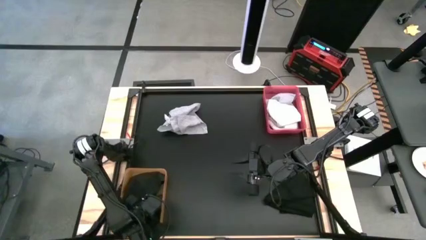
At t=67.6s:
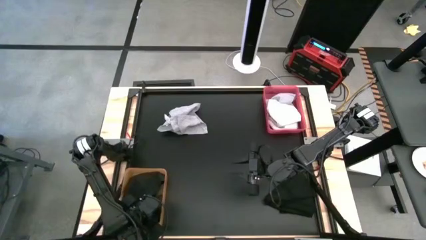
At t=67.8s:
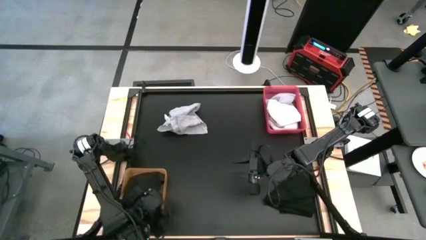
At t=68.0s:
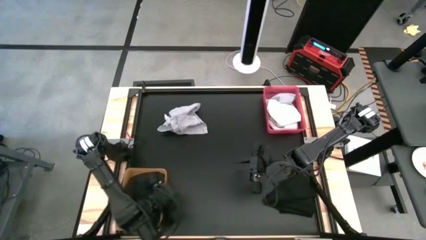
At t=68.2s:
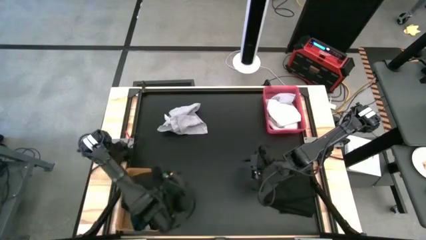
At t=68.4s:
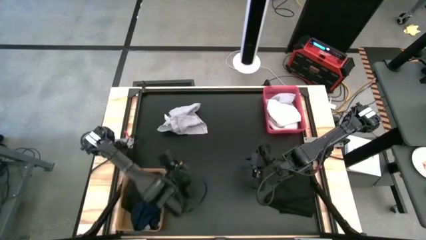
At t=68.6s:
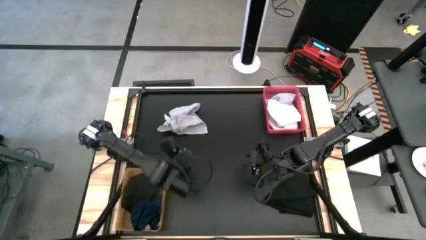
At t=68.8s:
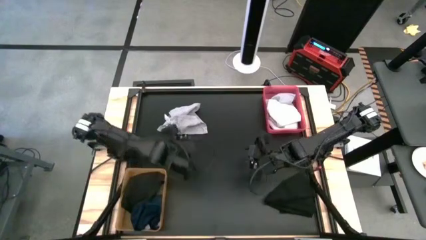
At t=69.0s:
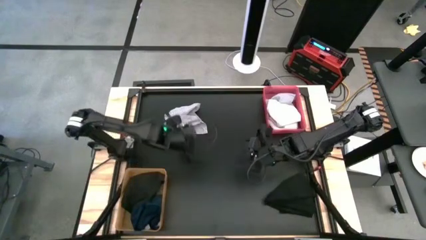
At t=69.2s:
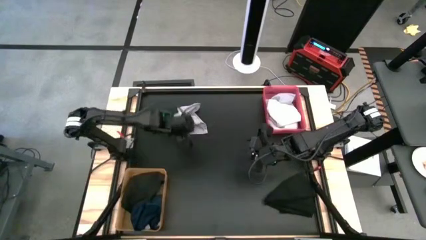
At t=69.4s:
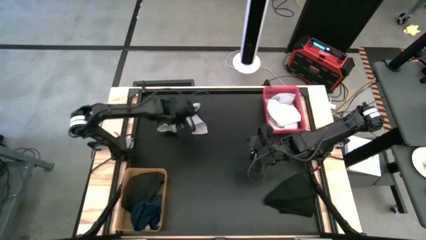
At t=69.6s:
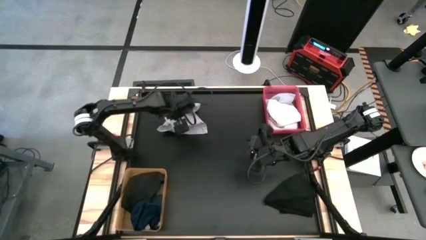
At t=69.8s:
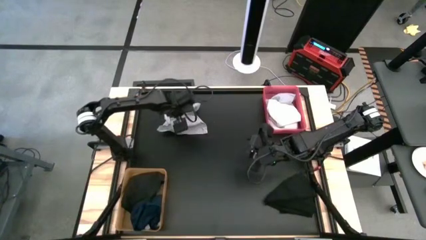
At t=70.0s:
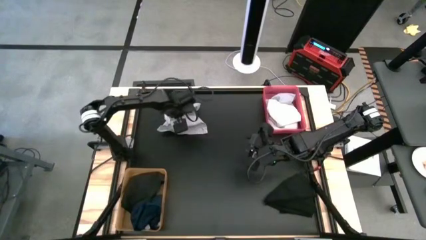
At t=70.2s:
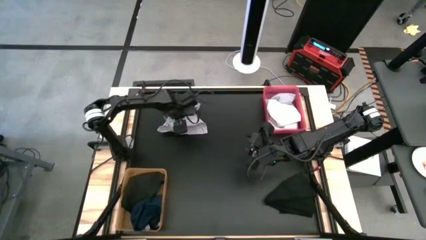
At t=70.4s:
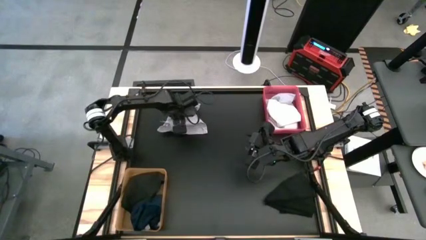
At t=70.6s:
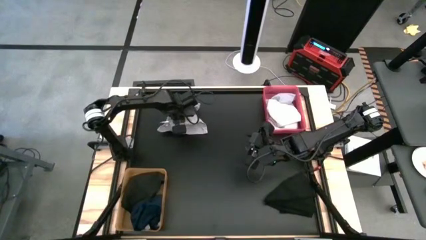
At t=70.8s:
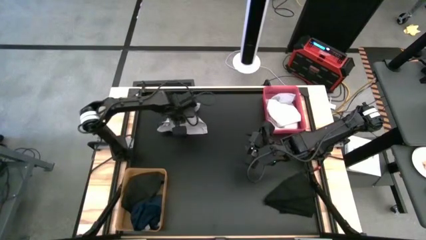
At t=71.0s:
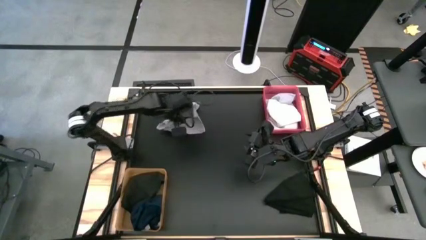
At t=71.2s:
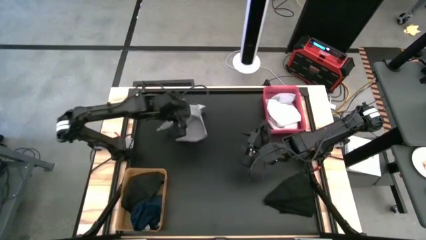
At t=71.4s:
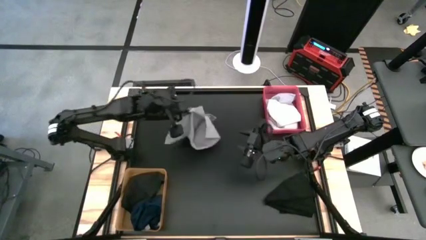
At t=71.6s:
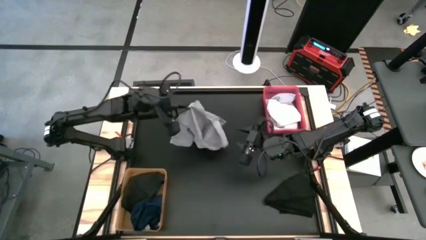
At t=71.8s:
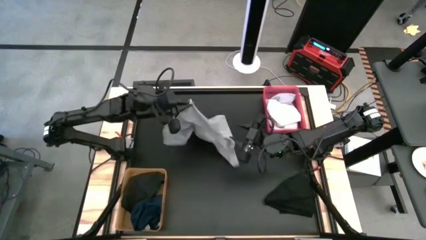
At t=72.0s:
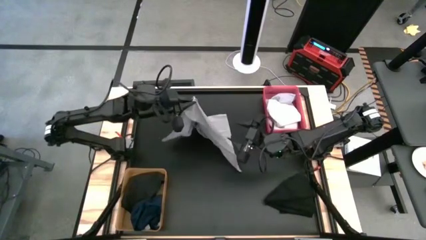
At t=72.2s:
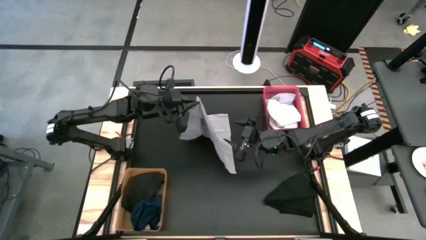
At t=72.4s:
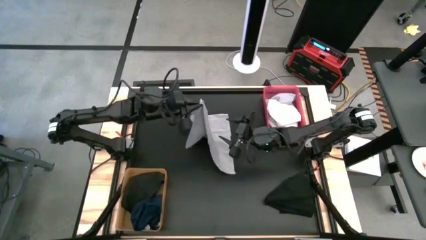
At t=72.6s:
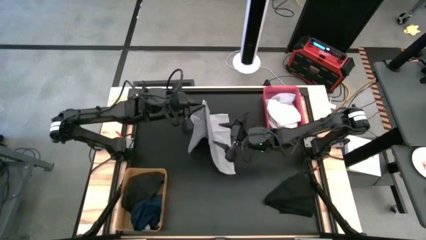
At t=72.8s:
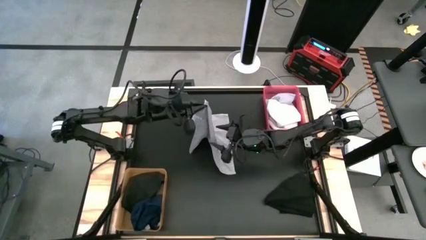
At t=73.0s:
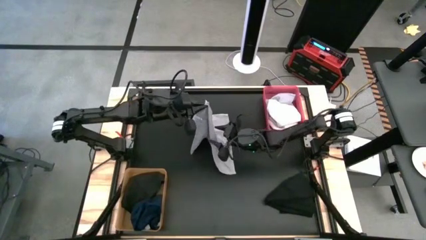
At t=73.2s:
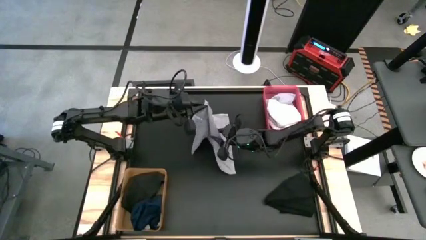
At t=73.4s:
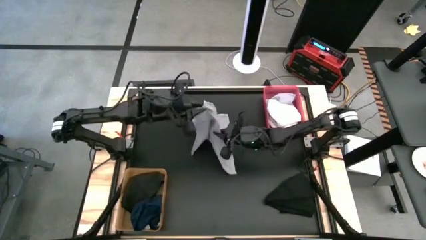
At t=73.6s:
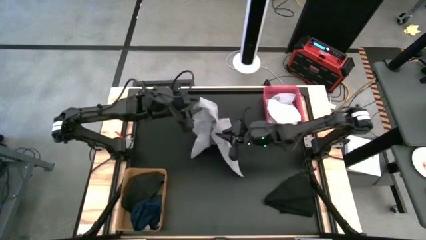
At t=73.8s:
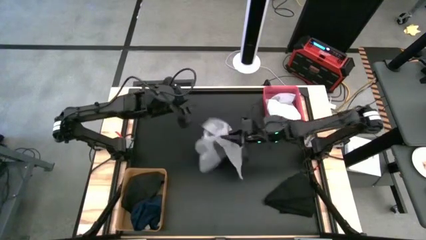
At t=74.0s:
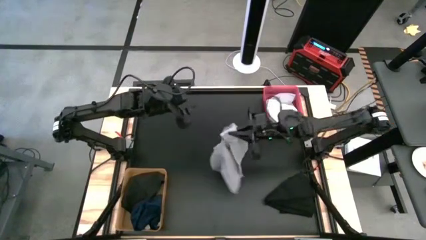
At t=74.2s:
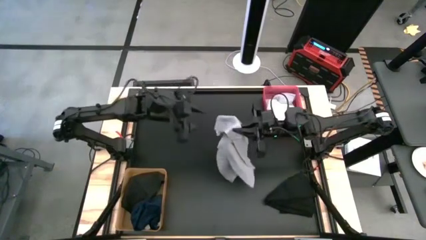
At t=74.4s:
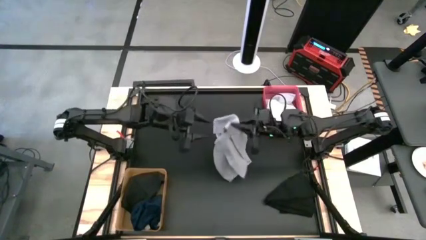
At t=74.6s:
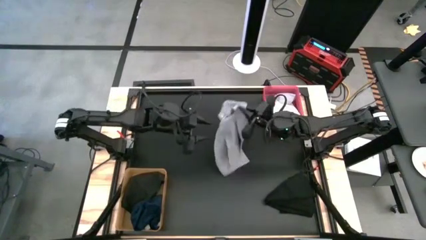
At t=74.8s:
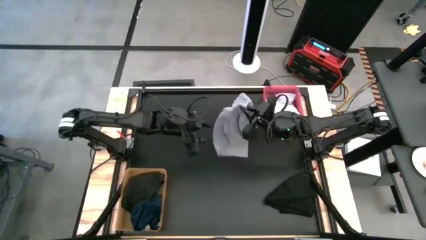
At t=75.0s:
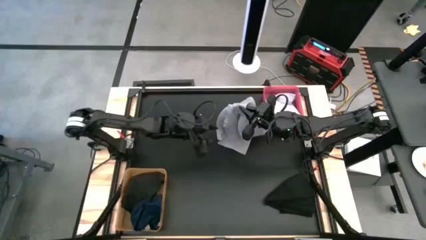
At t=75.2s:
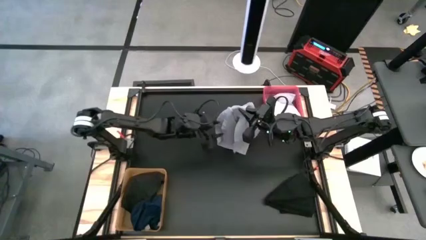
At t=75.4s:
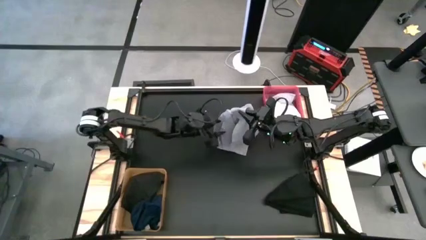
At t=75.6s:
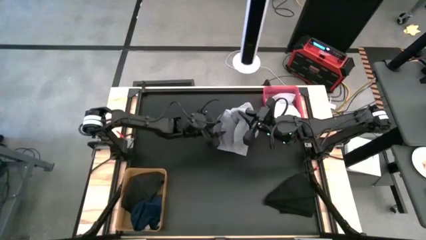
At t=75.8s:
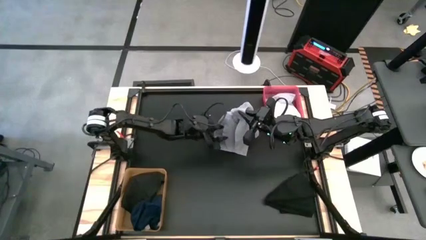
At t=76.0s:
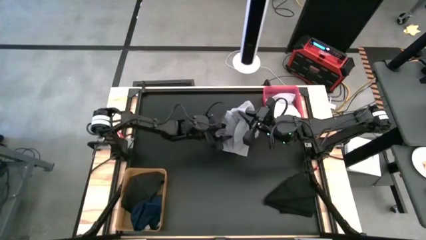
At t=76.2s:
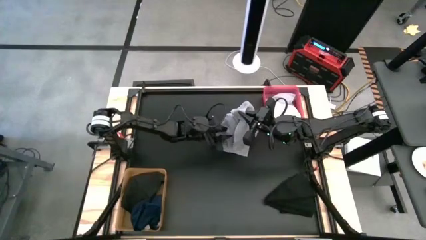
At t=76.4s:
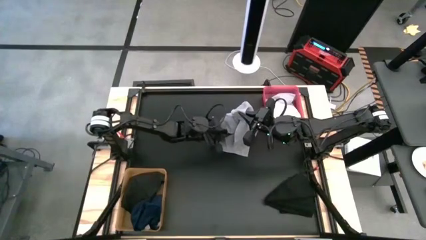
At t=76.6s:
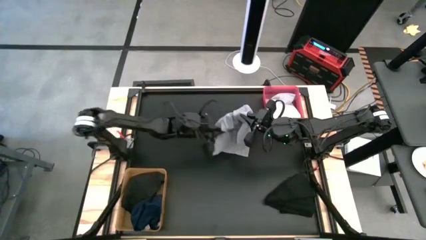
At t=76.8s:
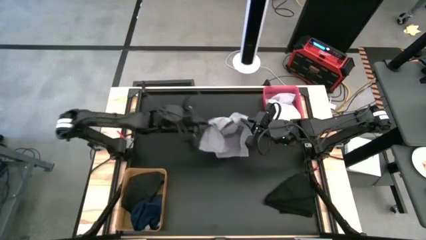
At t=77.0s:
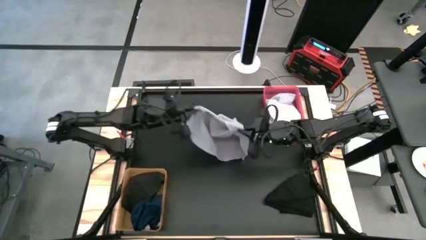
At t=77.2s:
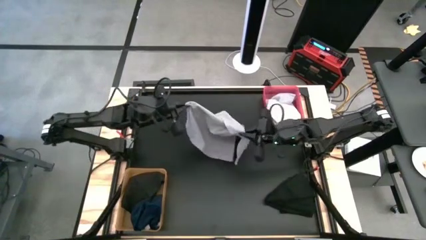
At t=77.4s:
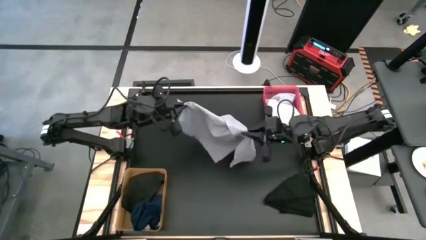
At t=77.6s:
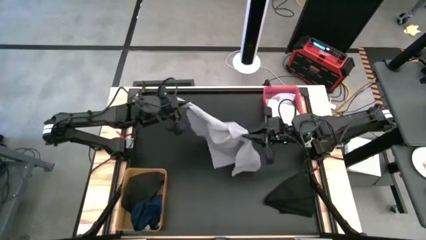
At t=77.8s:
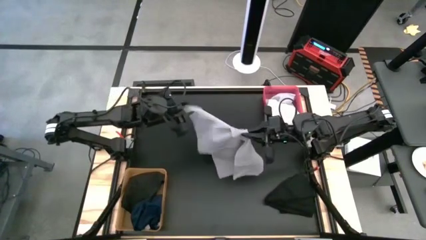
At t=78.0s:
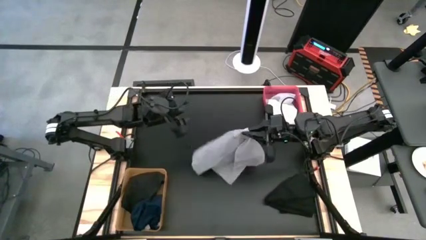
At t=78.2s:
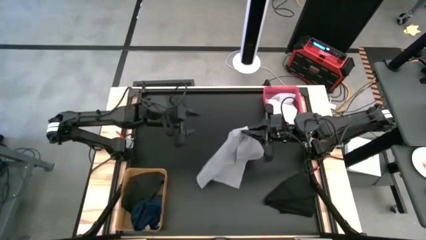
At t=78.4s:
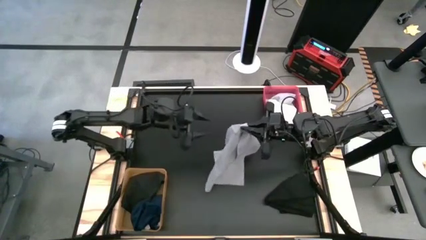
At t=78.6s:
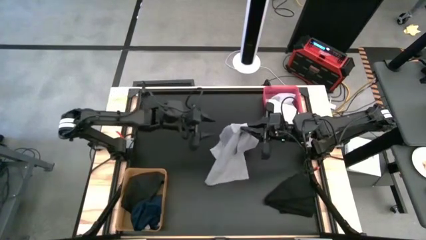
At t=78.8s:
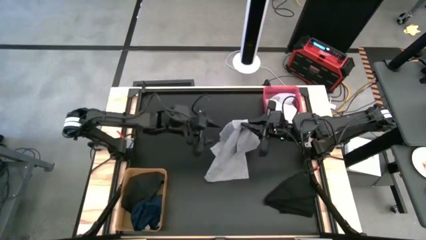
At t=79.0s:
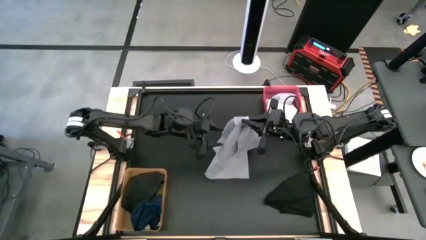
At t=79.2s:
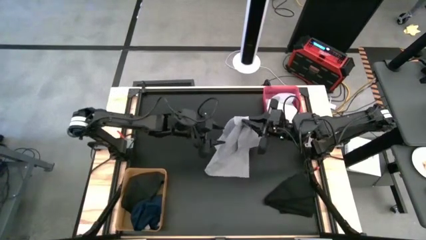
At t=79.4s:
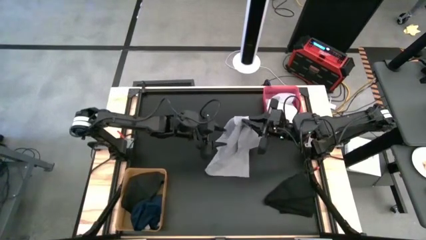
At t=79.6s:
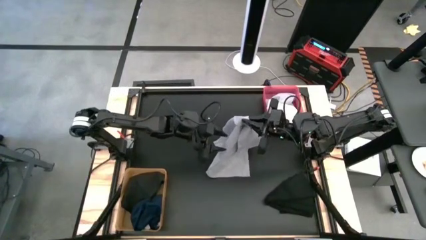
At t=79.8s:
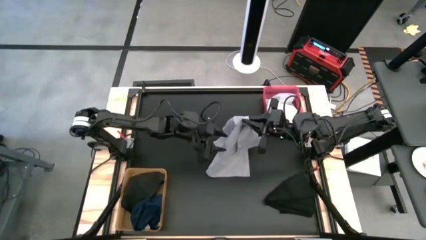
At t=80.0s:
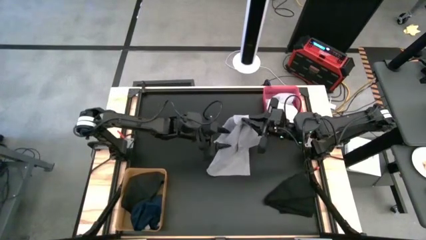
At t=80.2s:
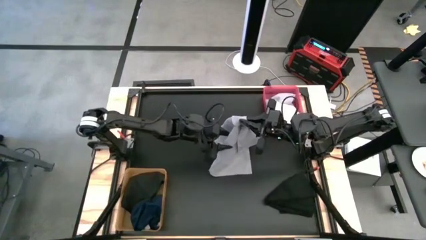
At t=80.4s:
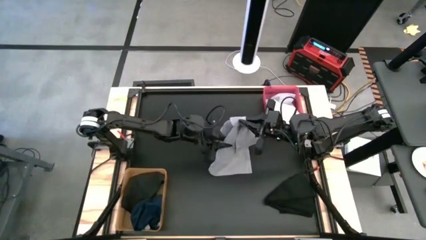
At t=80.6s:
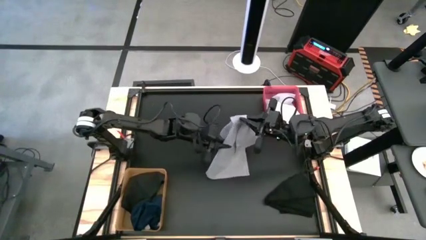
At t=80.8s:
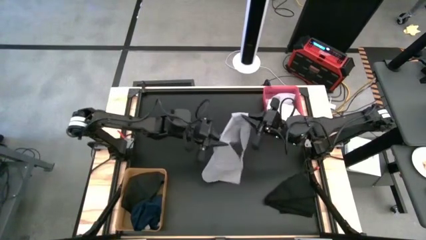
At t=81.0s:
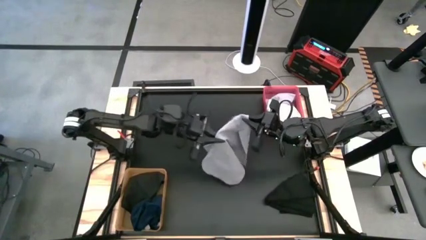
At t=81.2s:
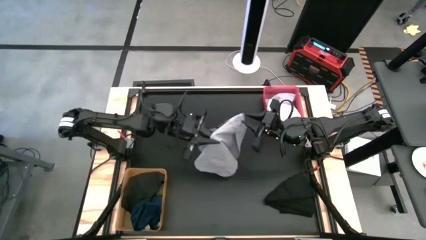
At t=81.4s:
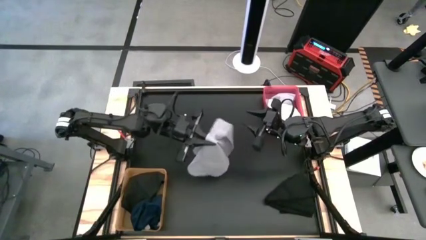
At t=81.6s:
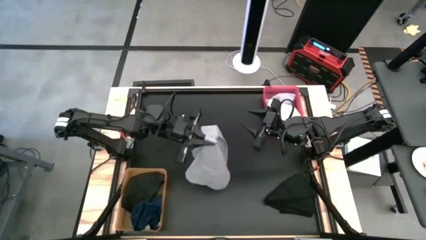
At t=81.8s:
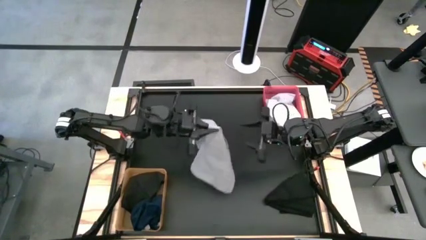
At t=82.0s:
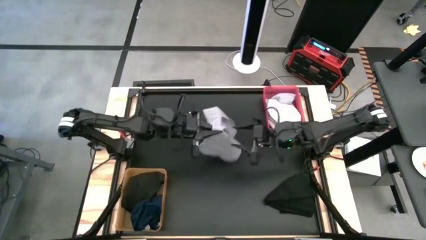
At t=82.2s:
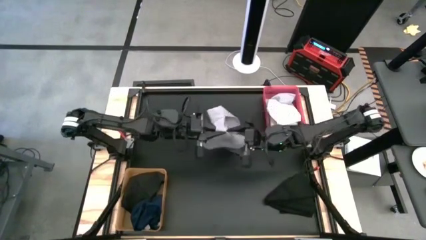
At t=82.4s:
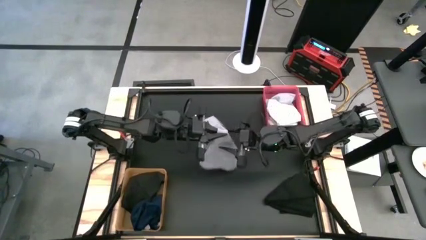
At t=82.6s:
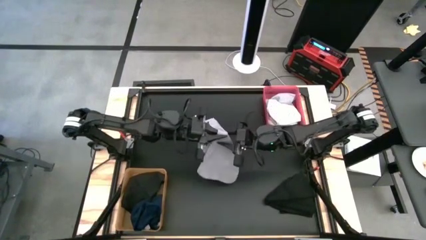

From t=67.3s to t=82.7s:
Task: Sort towels by color in basket
Put the gray microfiber towel into the pink bin
